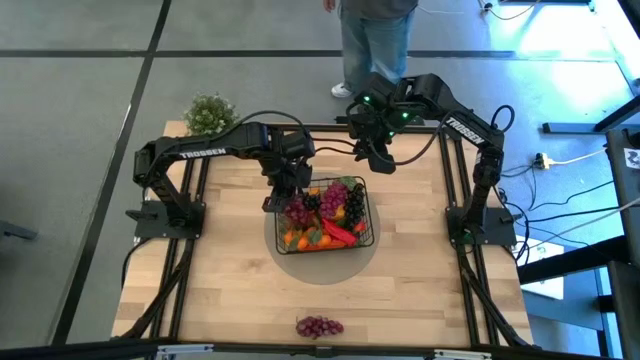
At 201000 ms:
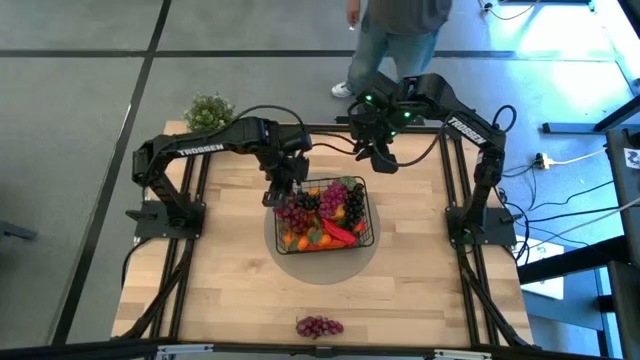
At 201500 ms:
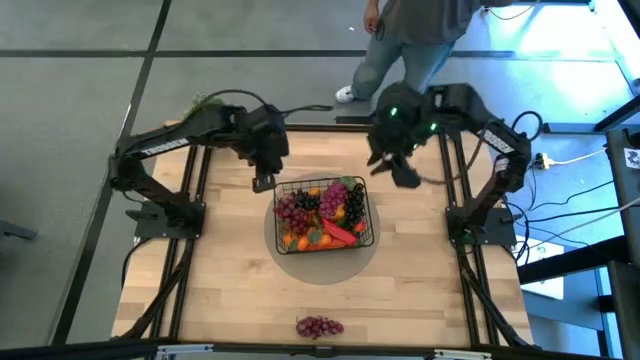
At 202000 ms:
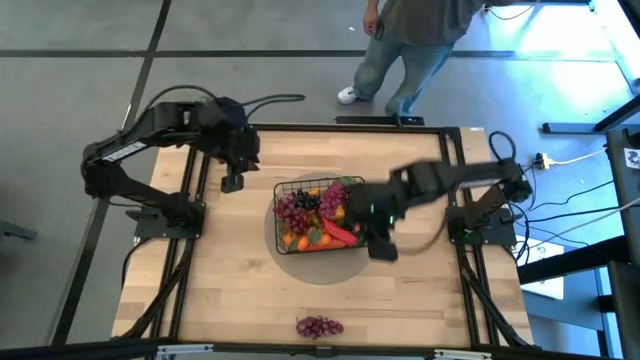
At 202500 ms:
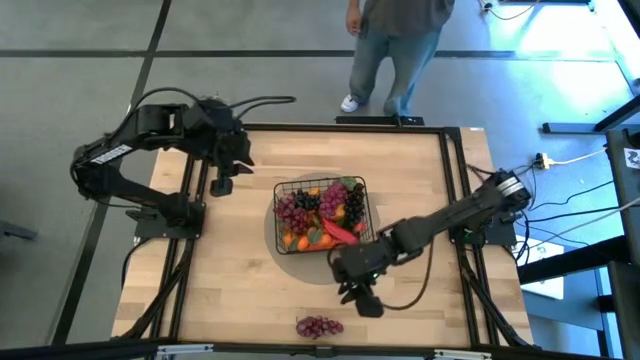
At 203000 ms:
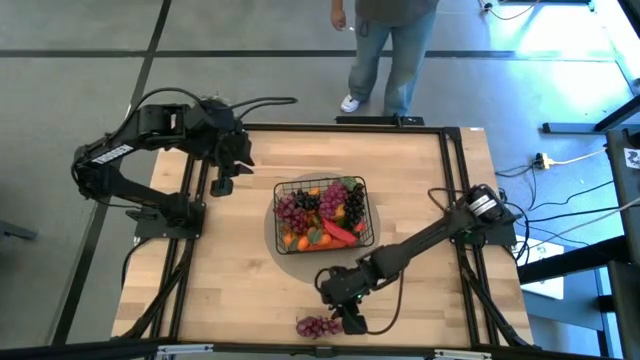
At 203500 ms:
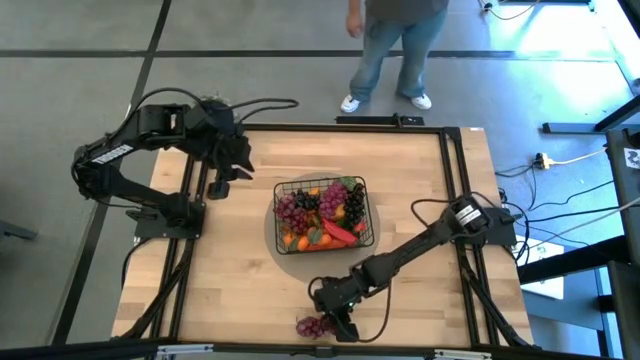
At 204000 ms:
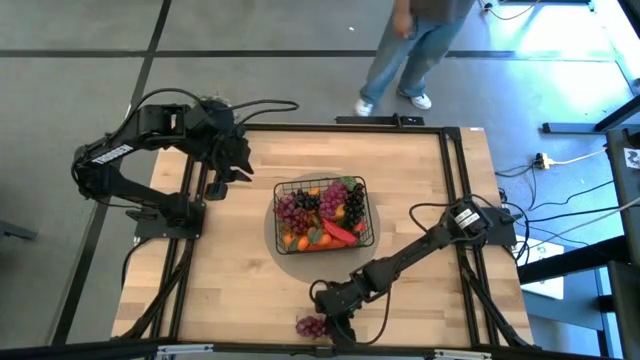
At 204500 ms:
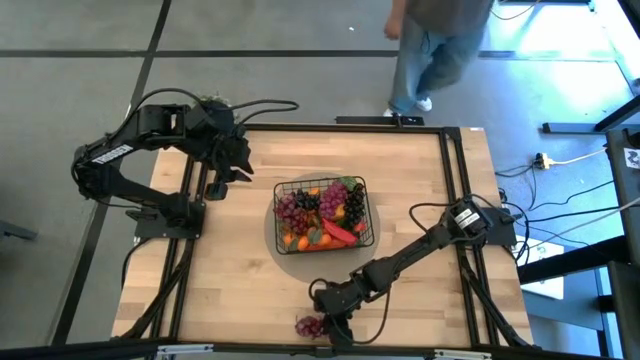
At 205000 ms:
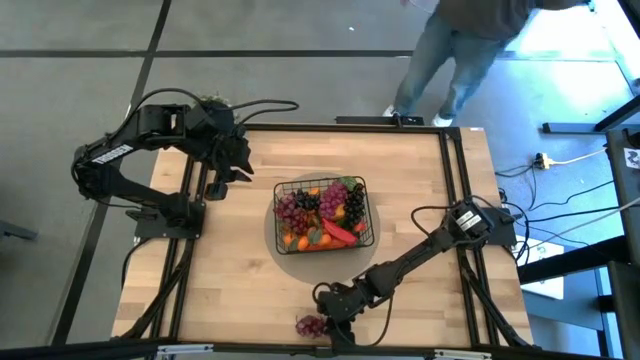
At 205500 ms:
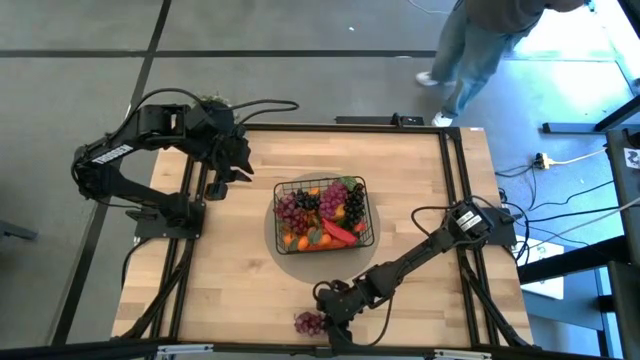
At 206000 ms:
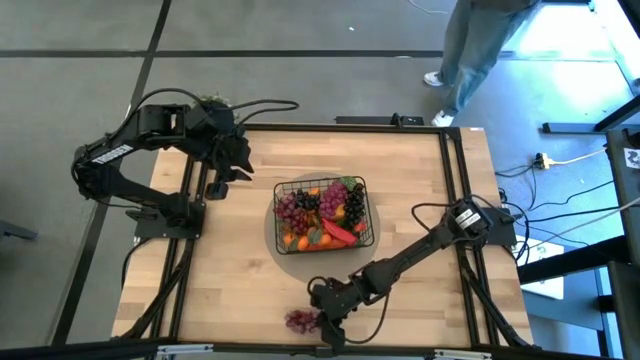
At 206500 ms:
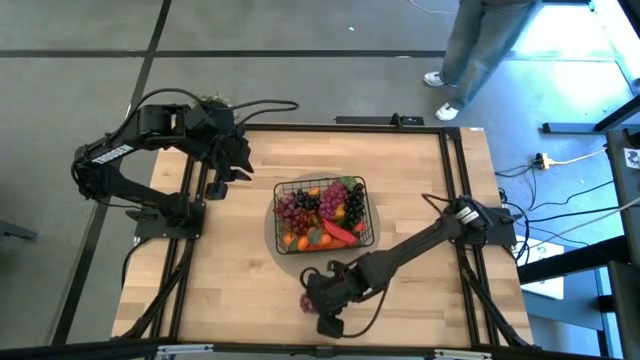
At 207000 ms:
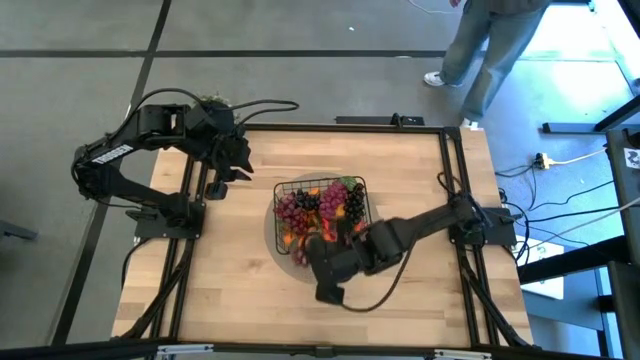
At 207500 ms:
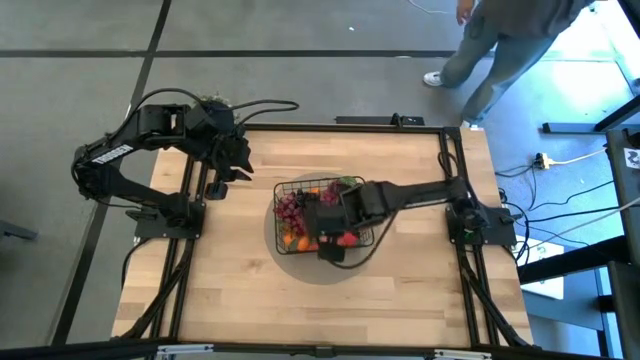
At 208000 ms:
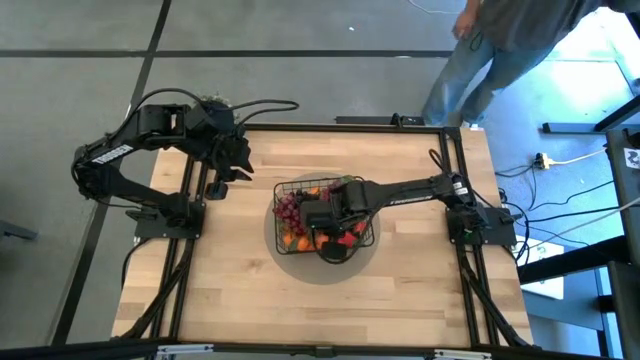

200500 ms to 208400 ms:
Task: Build produce basket
Put the red grape into the basket

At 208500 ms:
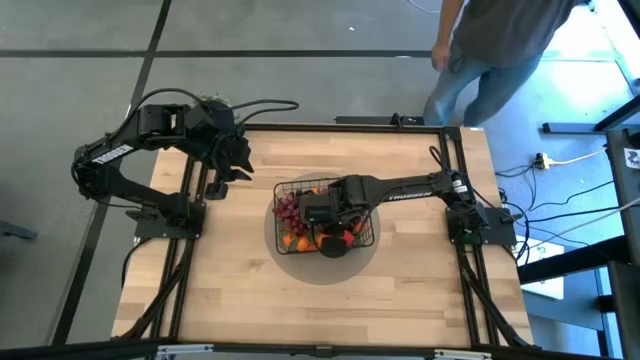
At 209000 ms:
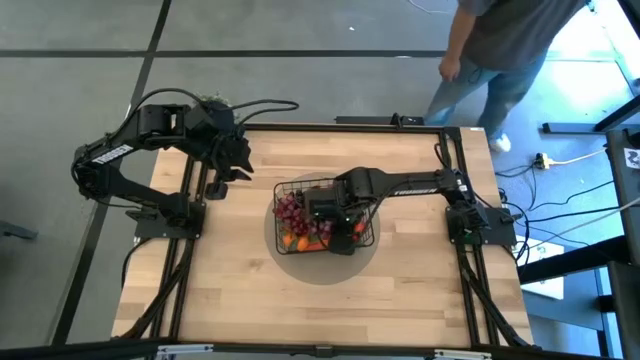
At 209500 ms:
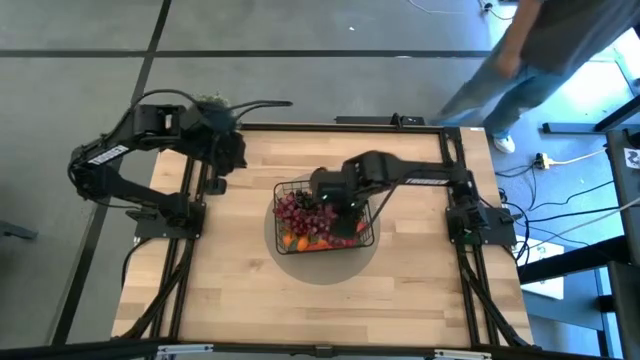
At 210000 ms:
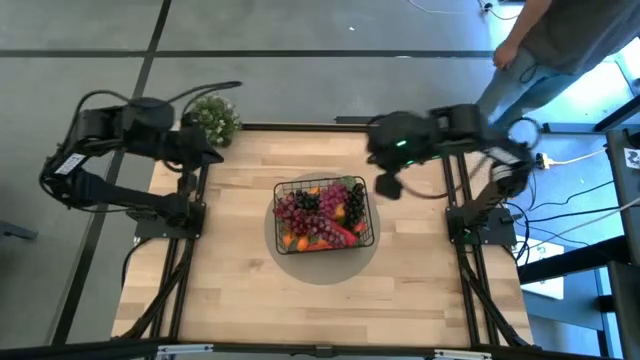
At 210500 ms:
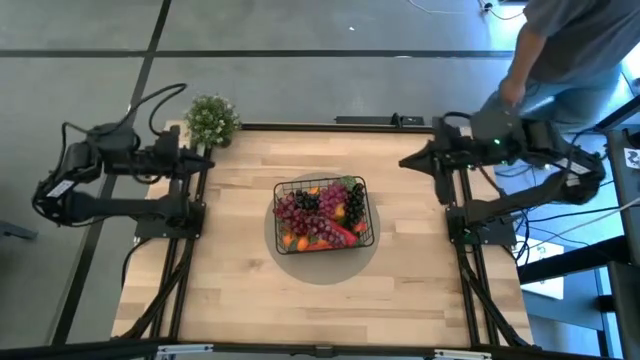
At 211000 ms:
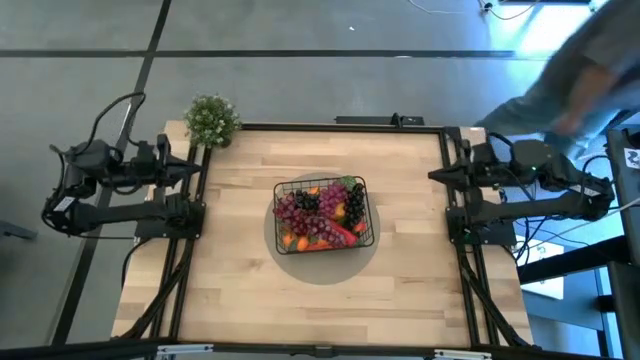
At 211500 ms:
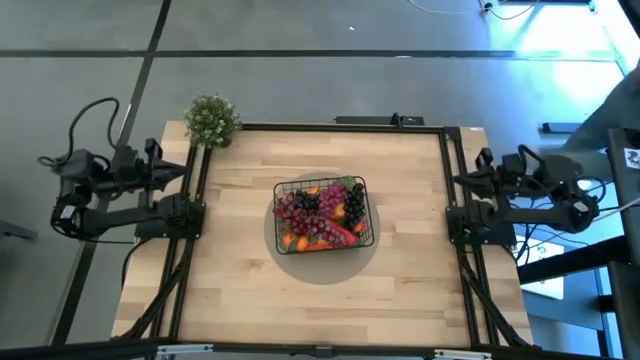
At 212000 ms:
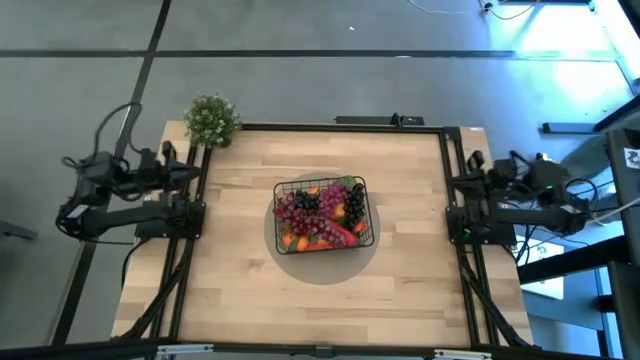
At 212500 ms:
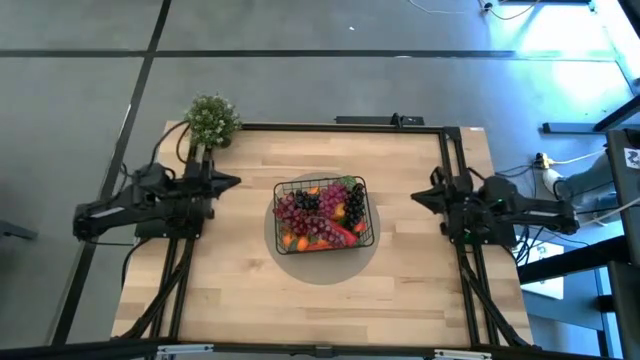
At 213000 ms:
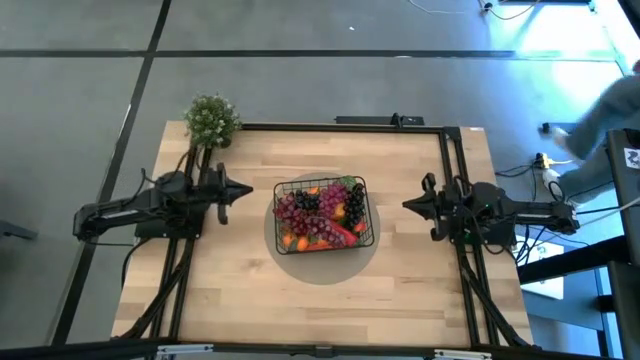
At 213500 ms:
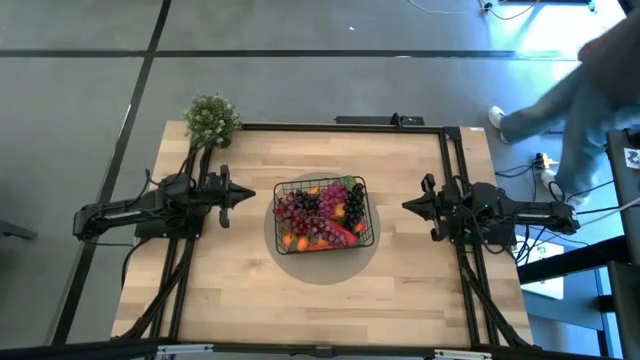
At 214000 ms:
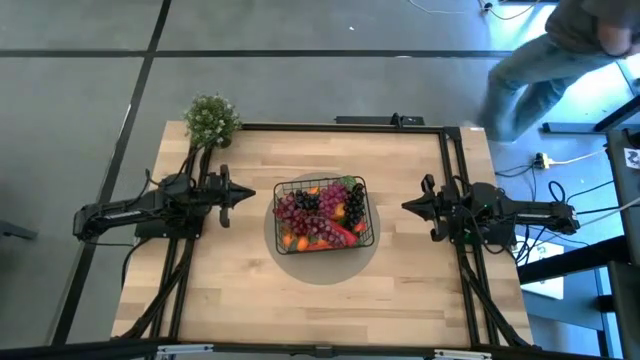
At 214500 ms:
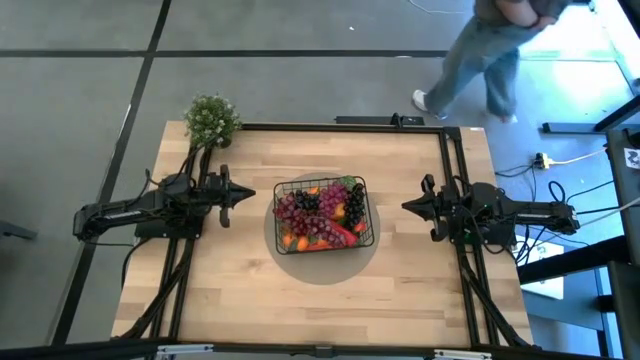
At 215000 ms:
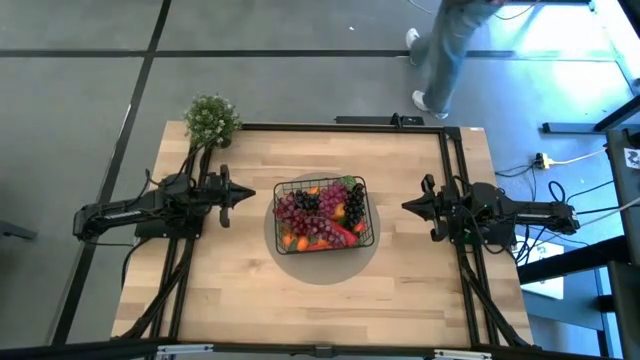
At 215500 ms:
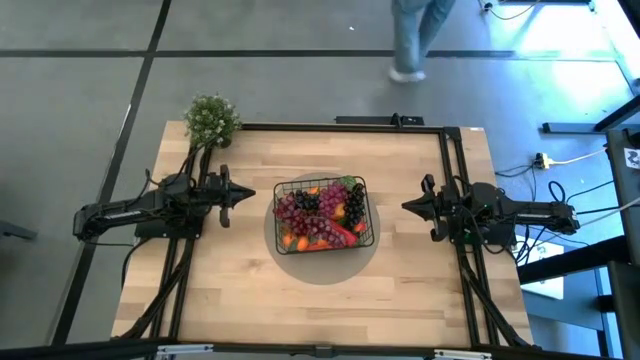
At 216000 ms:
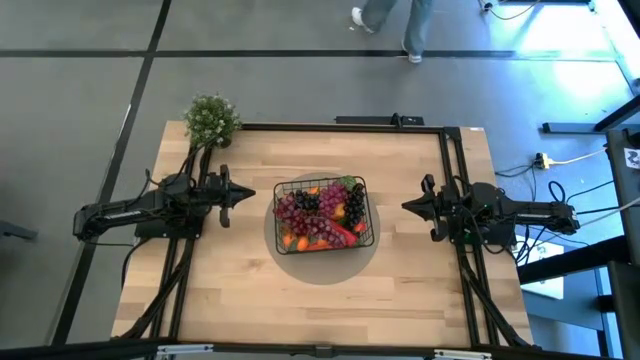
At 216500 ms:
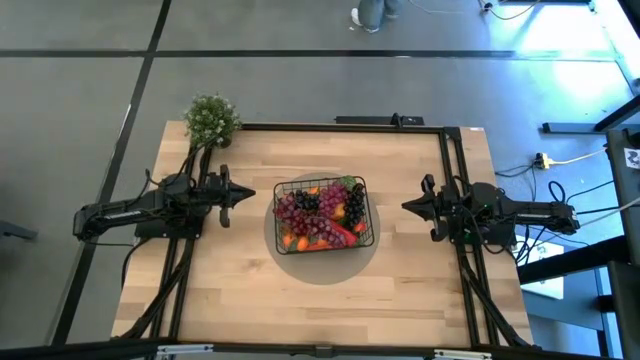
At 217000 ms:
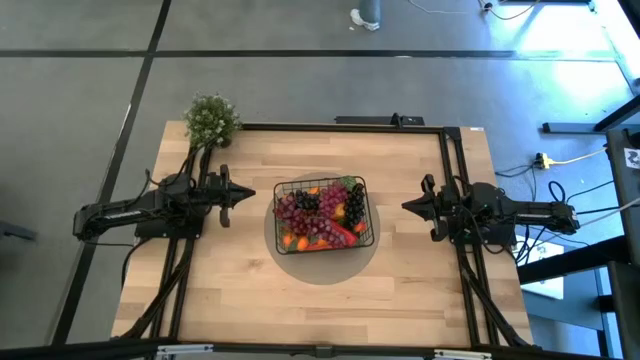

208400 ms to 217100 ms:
Return to Home Position

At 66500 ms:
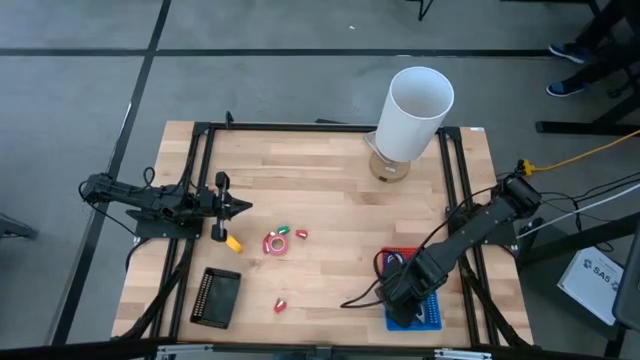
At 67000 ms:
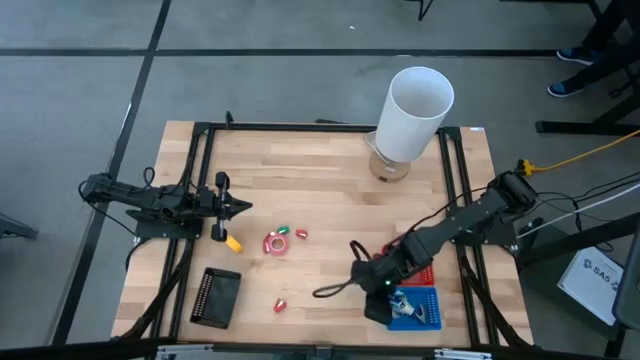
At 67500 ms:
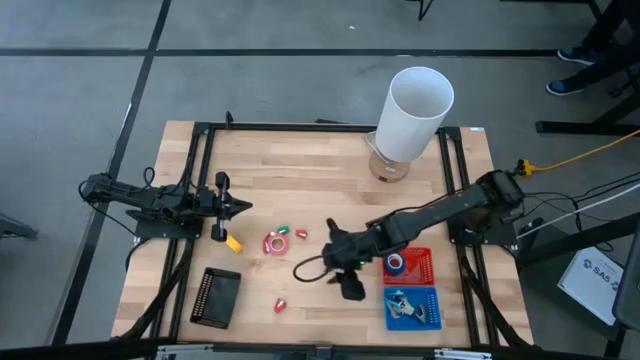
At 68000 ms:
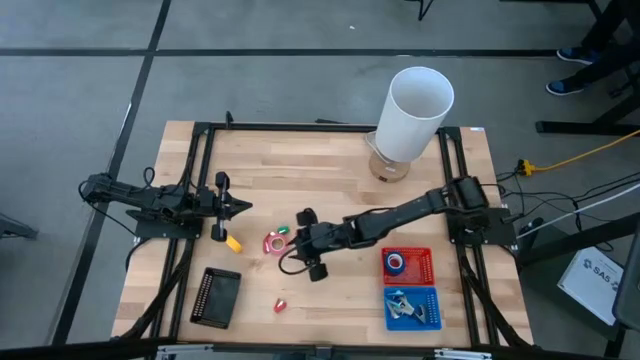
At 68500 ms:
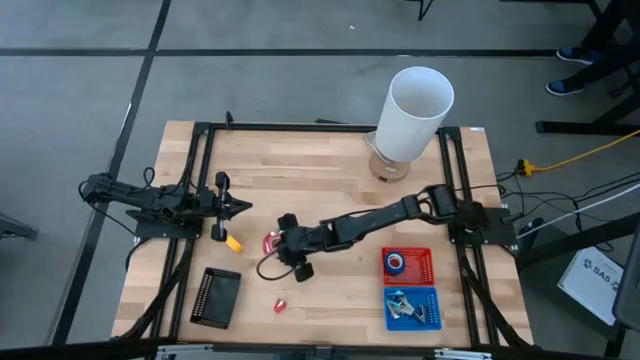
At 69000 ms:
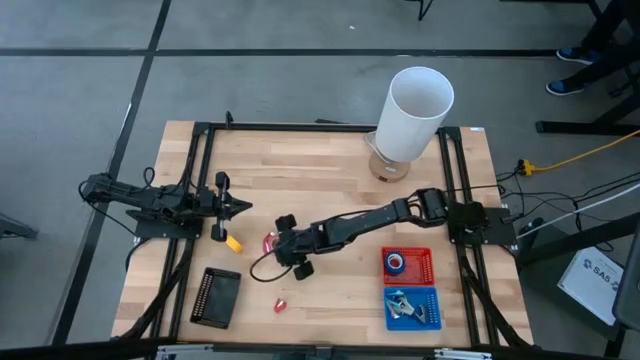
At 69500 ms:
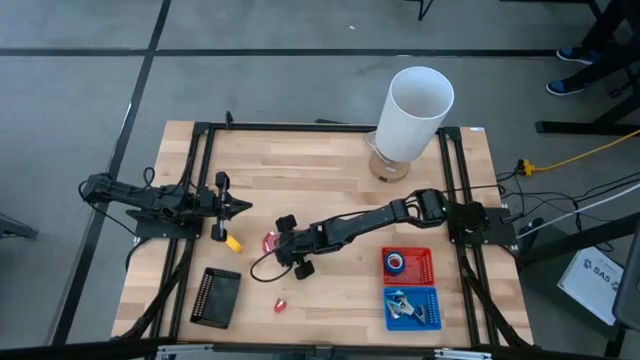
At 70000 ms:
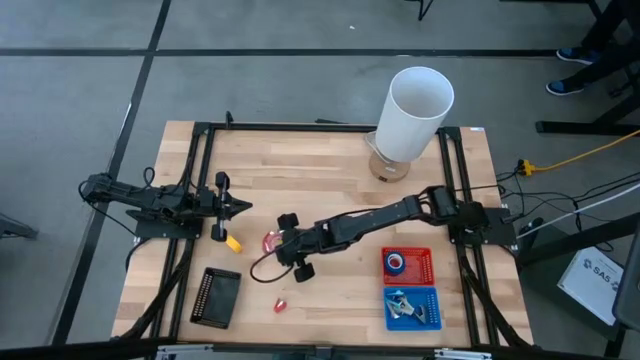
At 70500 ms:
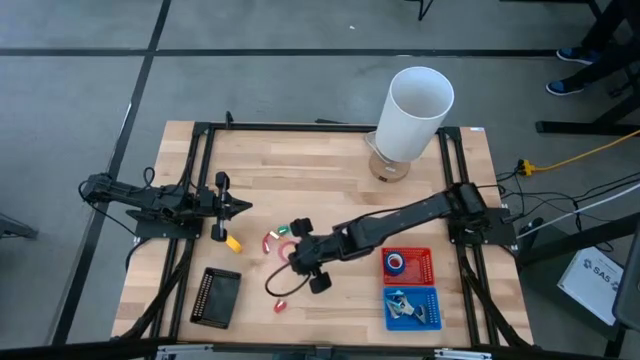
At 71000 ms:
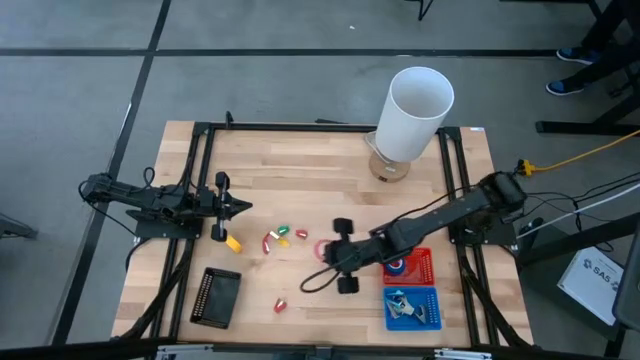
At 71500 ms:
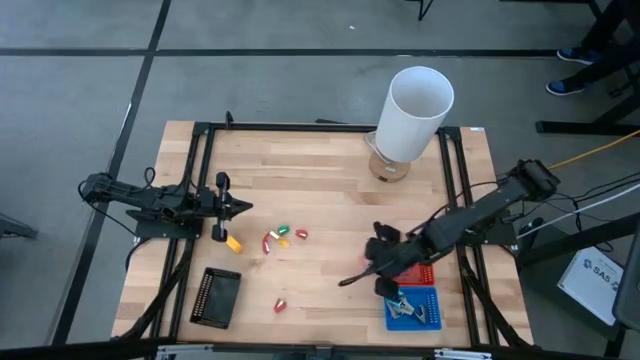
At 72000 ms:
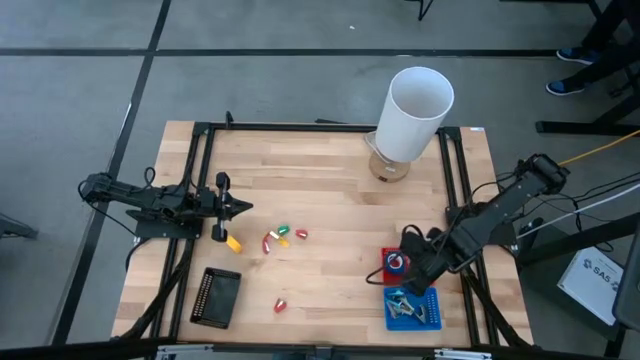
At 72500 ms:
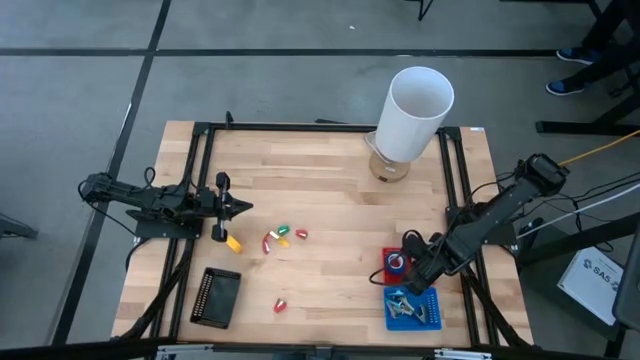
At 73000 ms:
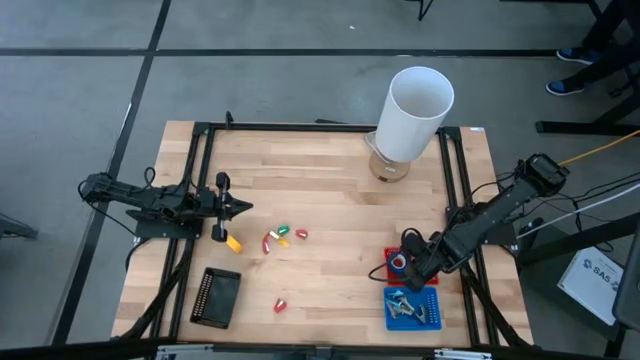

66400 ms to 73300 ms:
Task: Pick and place Stapler, Stapler remover, tape
Put the pink tape into the red basket
